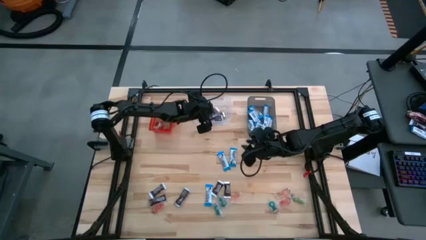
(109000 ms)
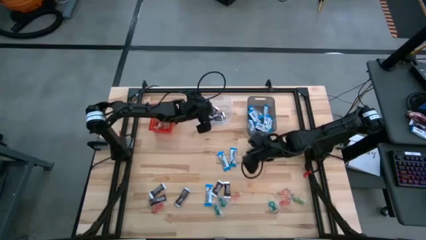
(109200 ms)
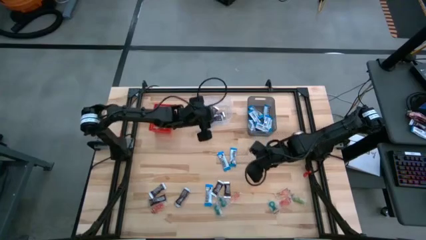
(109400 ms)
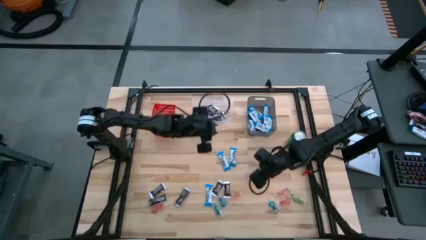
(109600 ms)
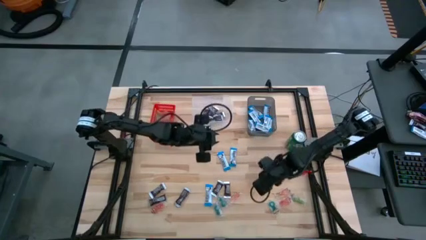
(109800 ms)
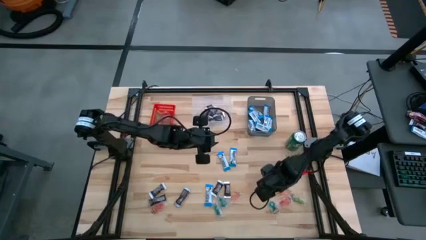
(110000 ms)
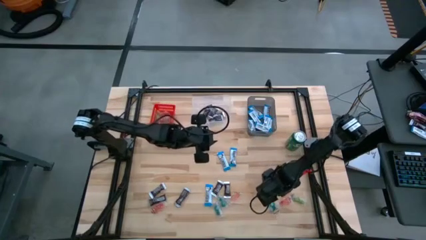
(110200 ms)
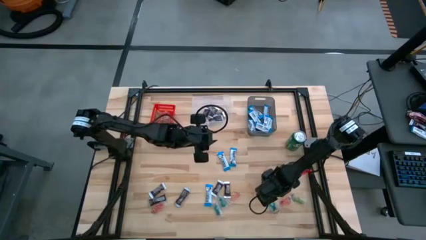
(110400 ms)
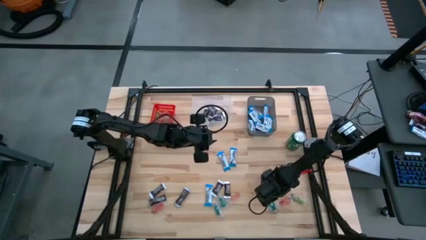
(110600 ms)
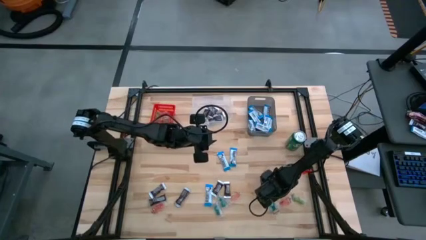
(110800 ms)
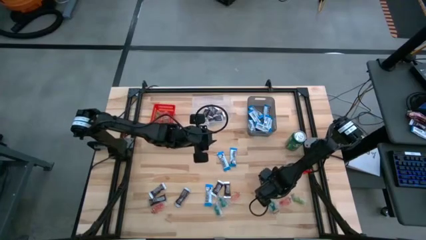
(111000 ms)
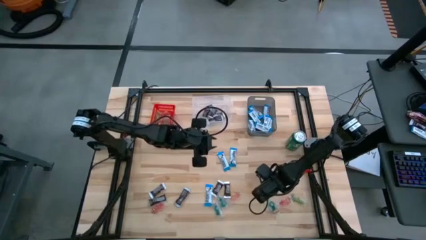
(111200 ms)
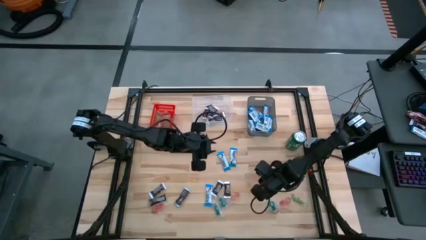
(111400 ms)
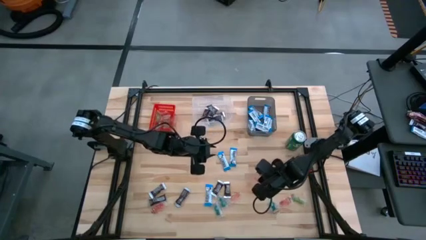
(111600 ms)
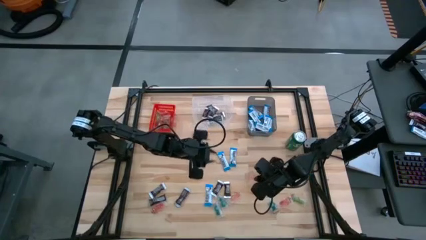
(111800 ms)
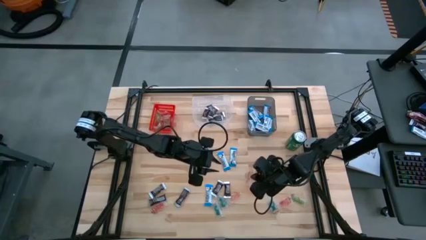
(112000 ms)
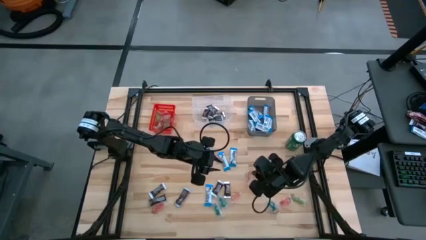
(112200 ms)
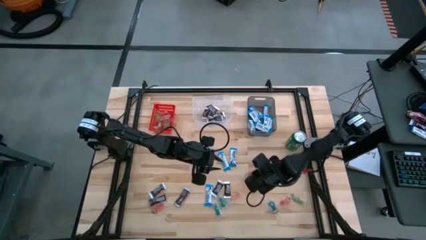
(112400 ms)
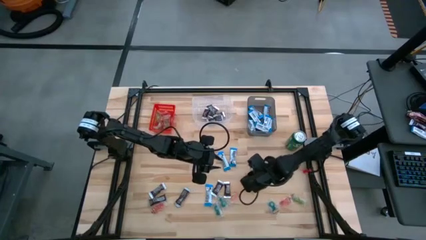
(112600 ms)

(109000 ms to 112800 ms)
Task: Sort candy
Put the orange candy into the red bin

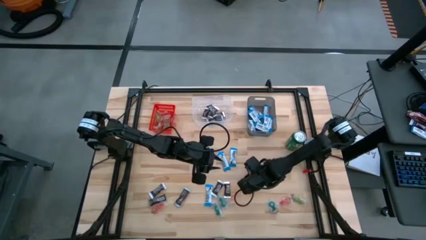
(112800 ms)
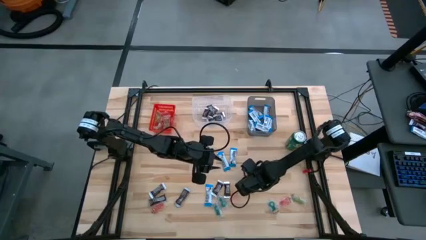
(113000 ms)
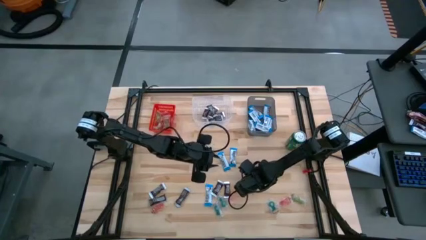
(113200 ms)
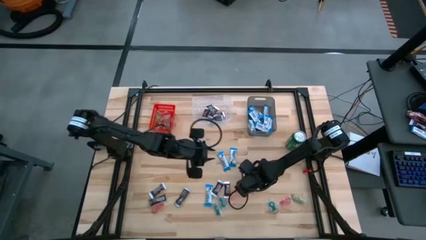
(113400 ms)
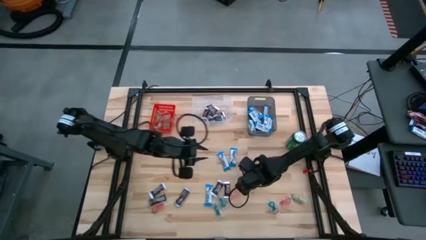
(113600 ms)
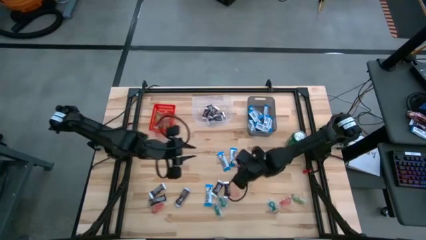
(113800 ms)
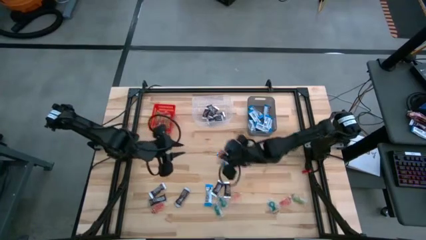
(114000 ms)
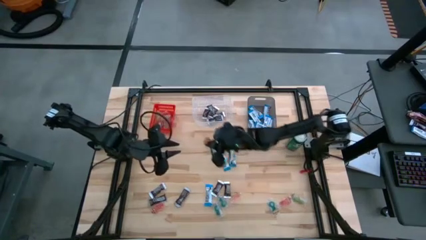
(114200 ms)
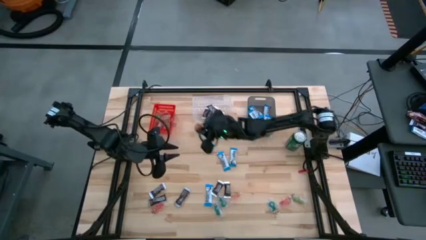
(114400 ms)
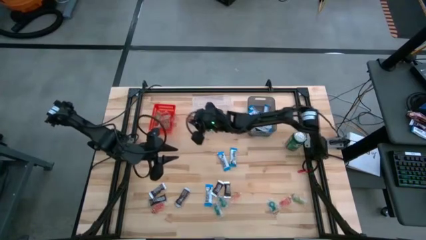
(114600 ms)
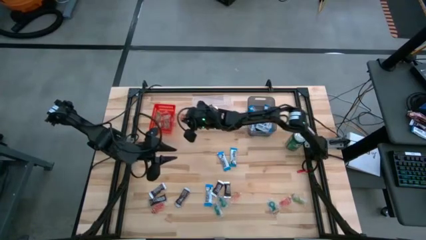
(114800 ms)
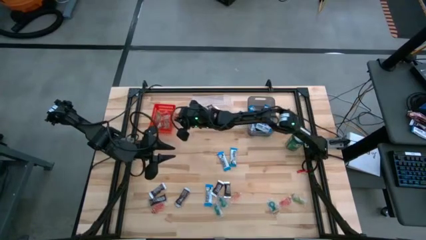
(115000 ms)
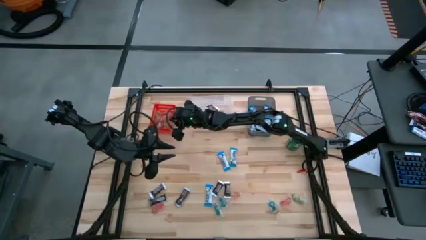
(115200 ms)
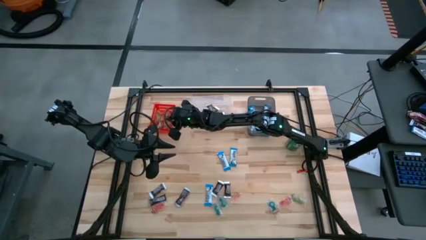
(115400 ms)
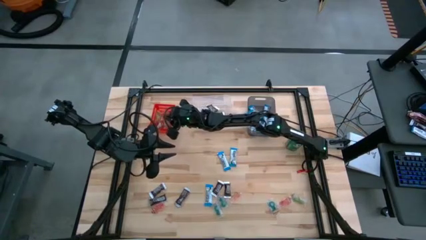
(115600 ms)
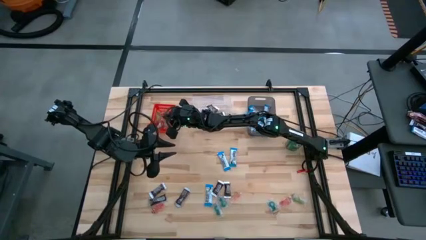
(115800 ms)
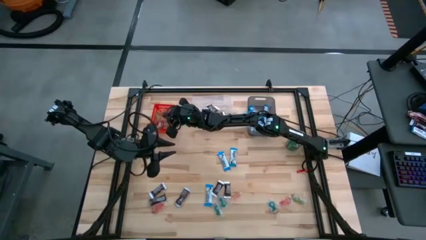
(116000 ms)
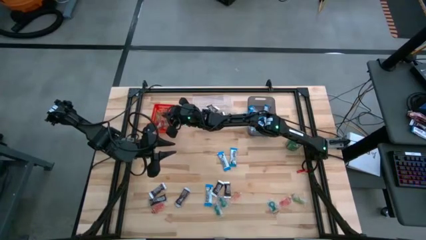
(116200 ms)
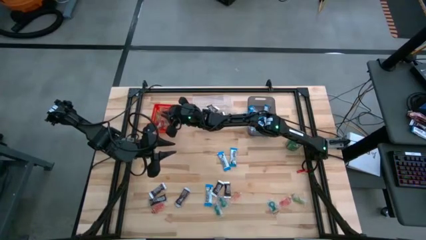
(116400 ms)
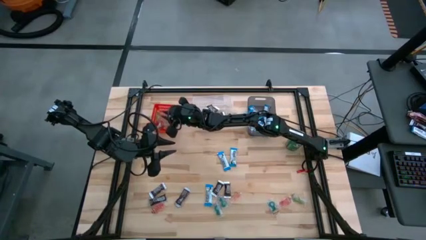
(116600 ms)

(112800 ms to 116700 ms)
Put the orange candy into the red bin

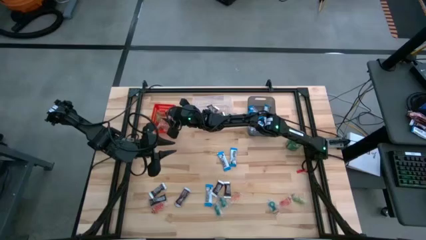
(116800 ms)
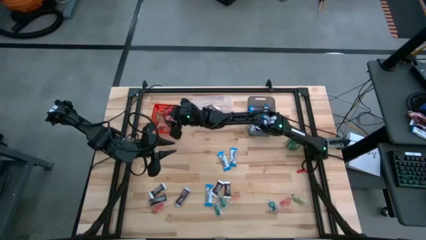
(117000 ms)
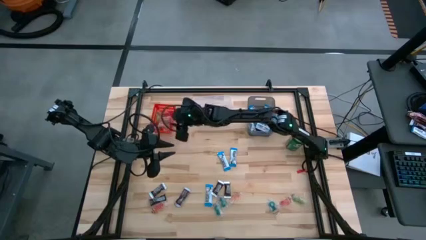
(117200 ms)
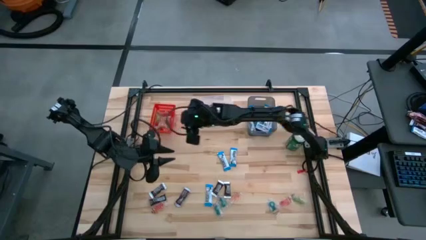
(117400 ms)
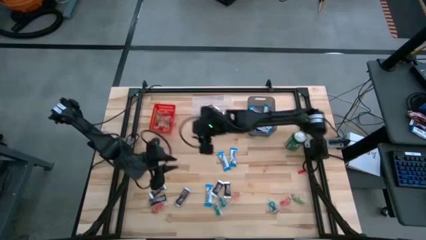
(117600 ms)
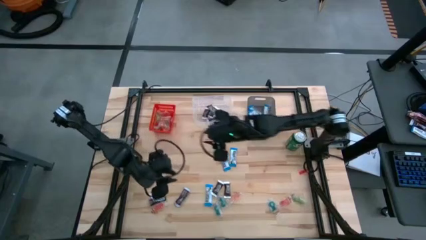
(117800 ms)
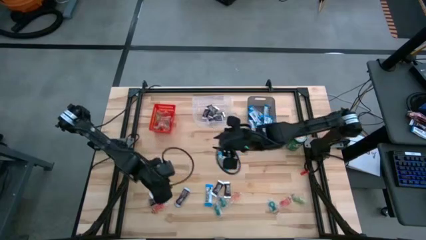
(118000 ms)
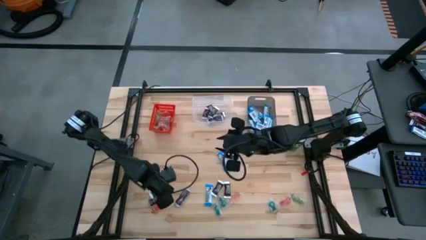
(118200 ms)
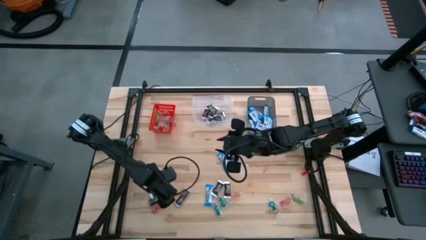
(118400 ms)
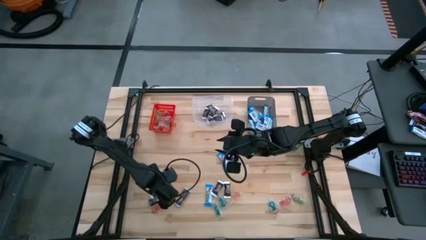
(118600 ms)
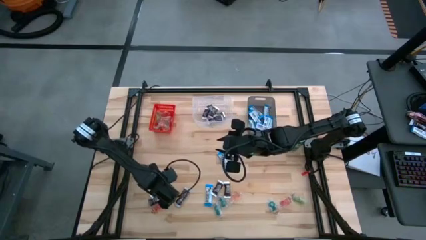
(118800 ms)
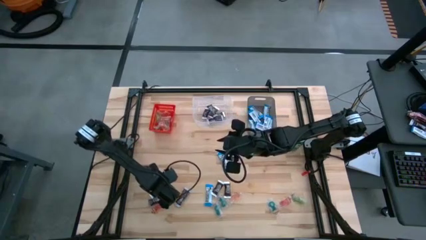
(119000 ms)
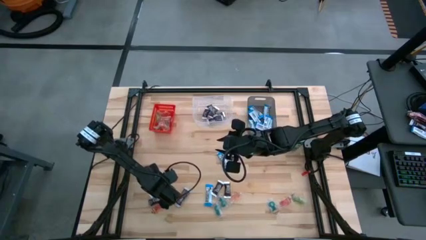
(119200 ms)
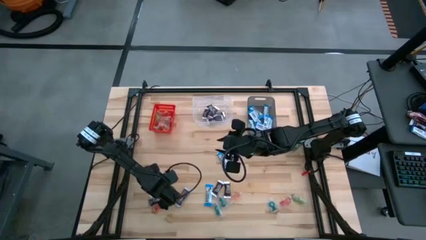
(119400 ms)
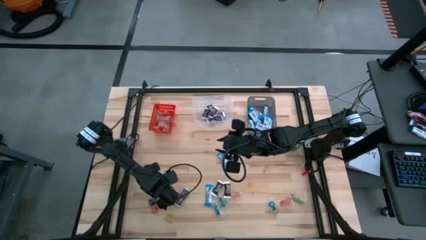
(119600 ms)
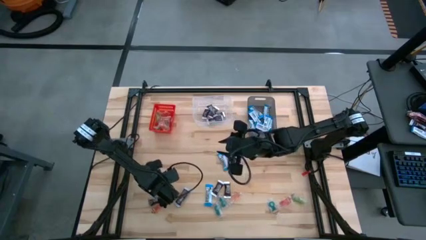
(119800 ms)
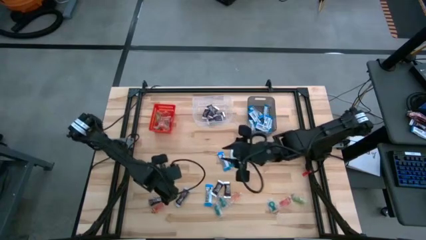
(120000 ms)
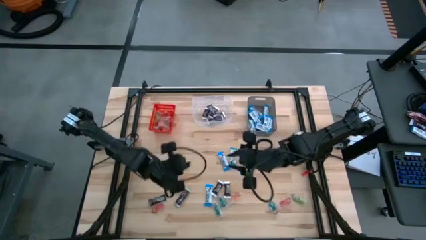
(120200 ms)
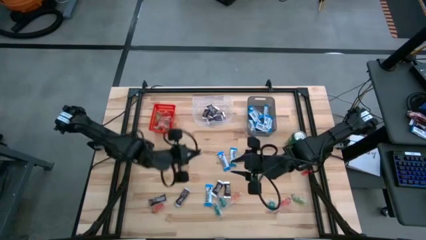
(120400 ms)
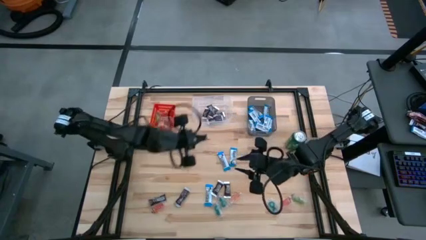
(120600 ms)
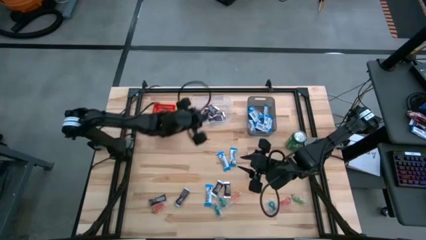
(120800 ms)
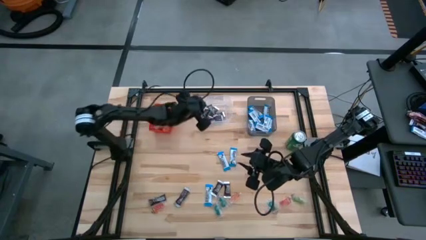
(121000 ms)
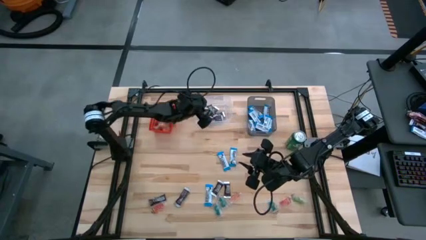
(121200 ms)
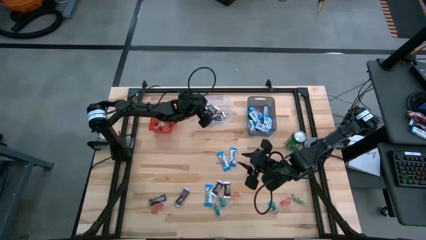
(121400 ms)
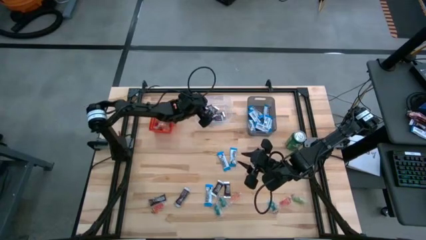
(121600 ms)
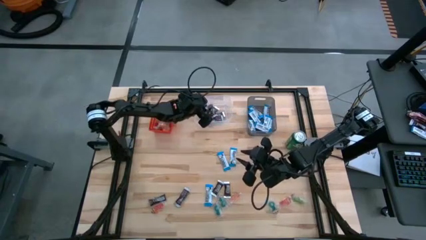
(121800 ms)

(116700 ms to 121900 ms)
Put the black chocolate bar into the transparent bin

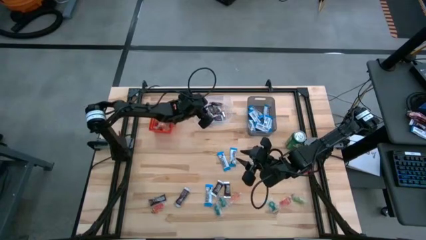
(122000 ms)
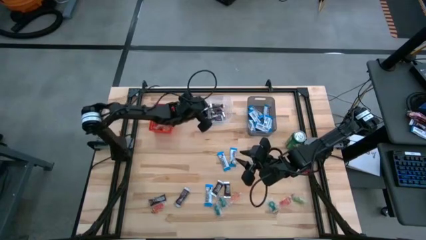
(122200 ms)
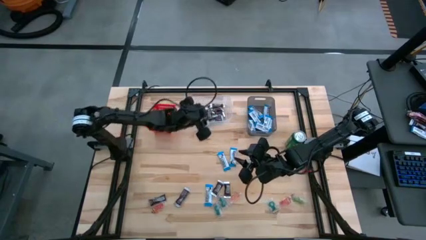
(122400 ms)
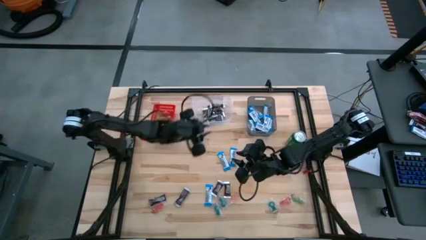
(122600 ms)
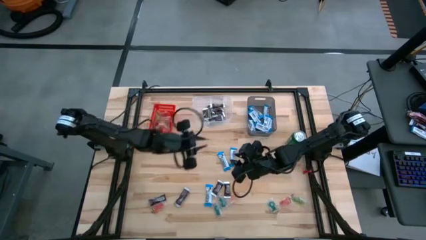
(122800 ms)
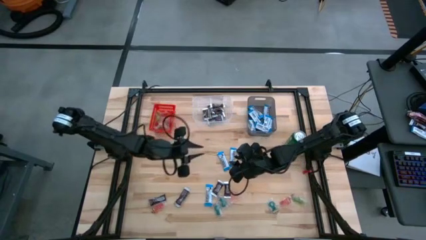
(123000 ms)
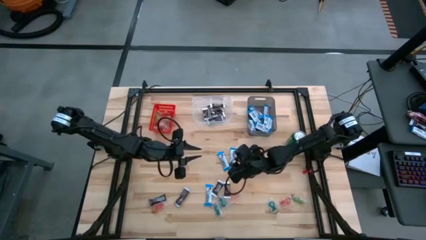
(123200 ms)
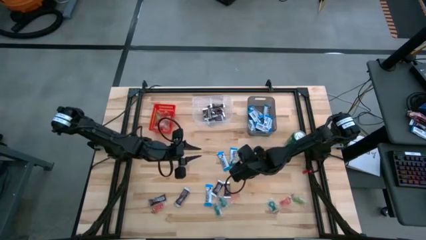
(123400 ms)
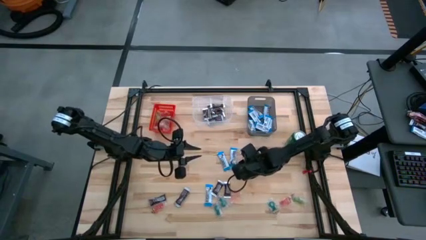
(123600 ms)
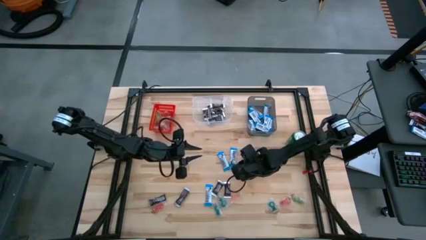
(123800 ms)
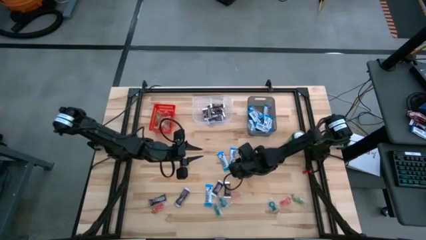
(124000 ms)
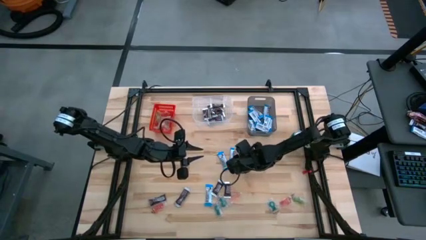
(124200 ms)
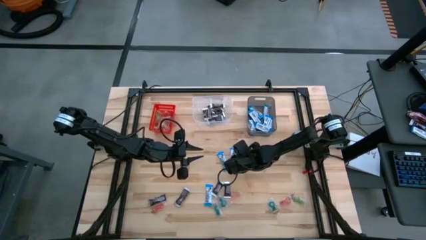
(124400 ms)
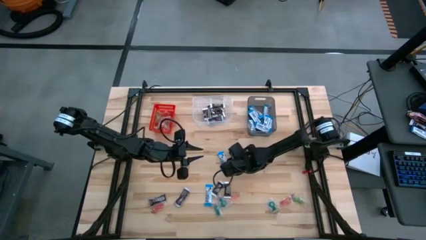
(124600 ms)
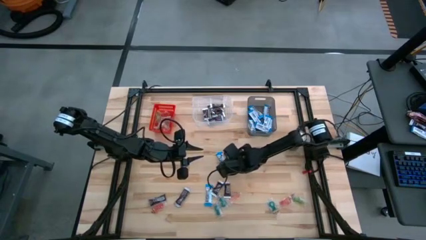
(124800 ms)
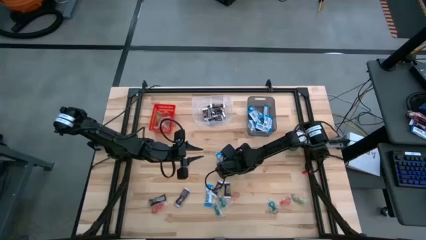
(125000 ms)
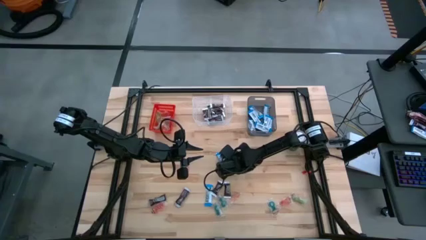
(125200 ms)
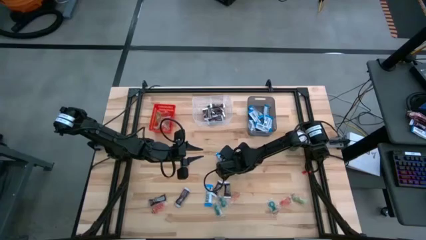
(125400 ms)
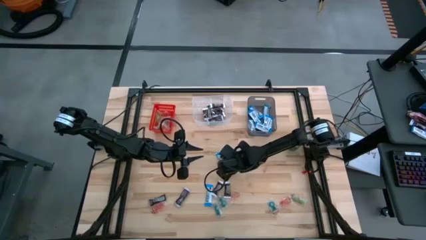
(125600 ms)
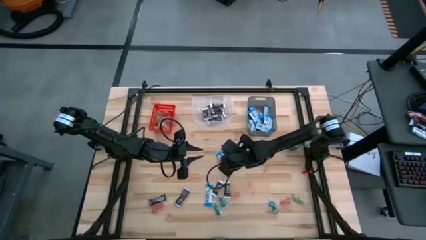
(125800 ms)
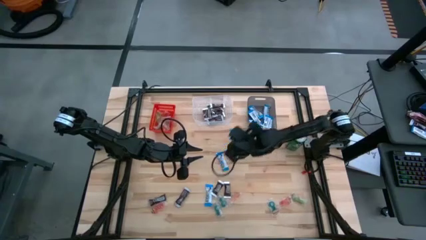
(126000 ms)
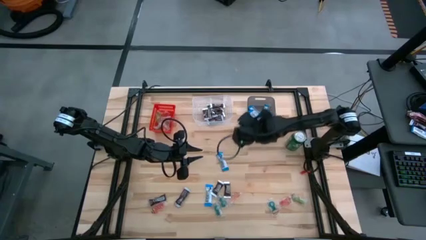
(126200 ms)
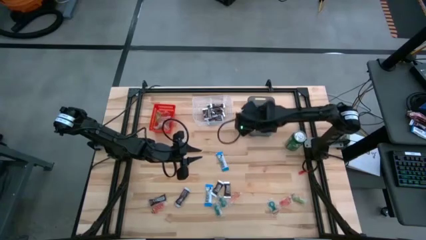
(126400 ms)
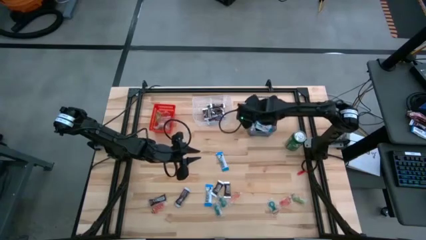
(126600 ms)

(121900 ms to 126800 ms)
Put the white chocolate bar into the black bin
